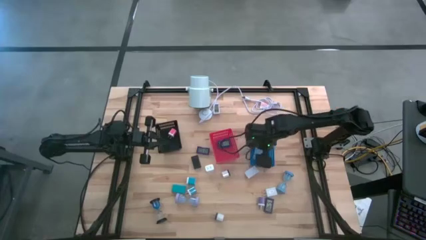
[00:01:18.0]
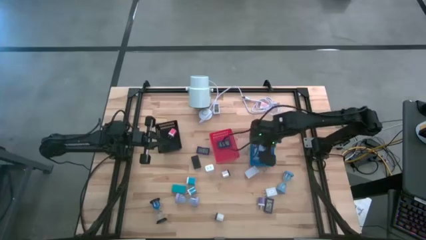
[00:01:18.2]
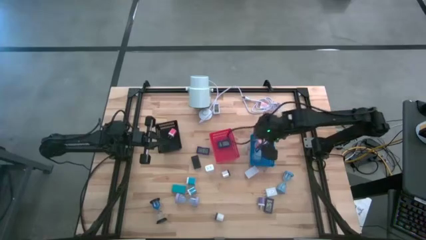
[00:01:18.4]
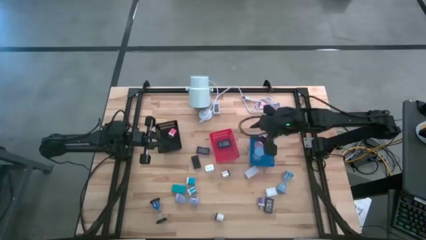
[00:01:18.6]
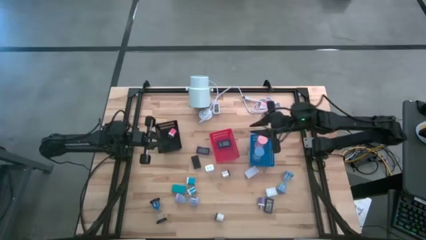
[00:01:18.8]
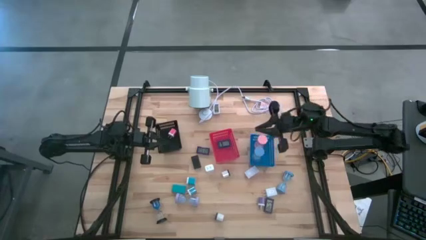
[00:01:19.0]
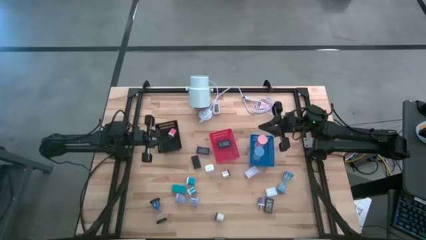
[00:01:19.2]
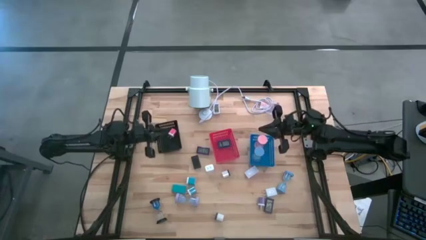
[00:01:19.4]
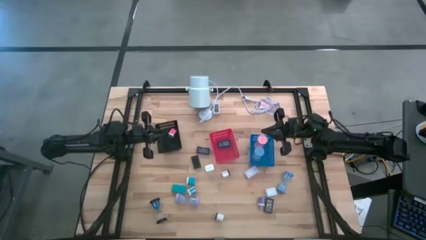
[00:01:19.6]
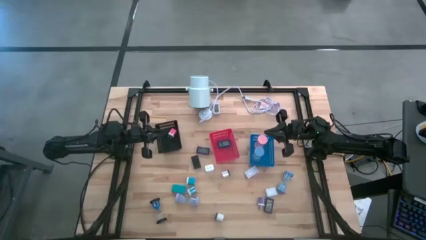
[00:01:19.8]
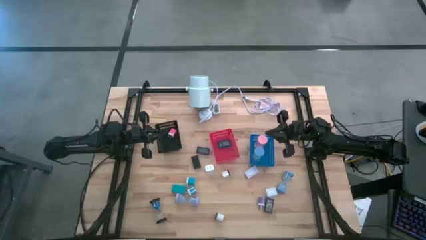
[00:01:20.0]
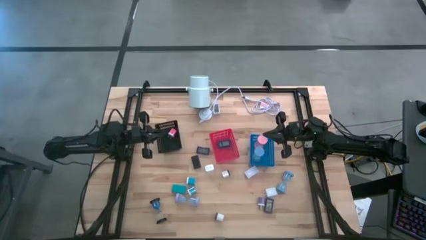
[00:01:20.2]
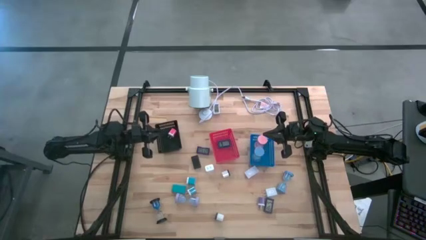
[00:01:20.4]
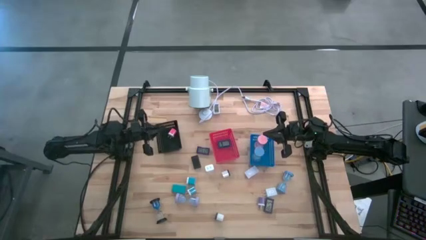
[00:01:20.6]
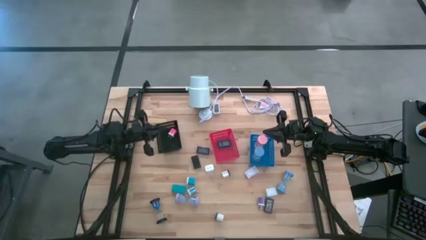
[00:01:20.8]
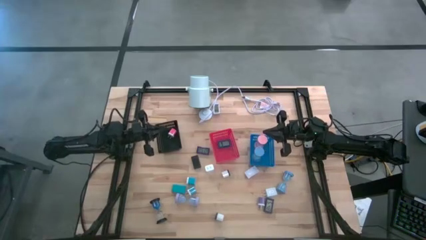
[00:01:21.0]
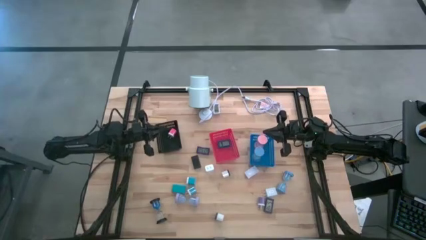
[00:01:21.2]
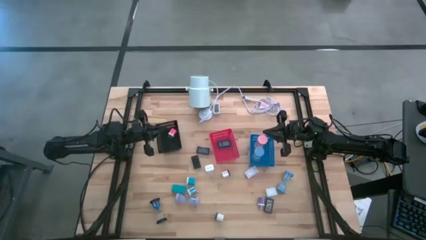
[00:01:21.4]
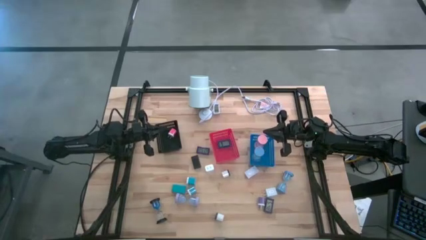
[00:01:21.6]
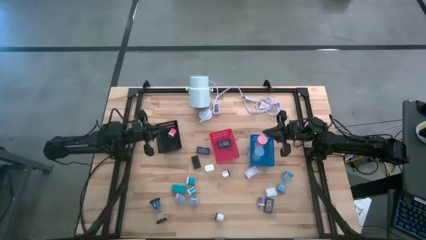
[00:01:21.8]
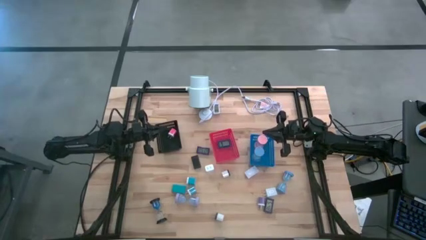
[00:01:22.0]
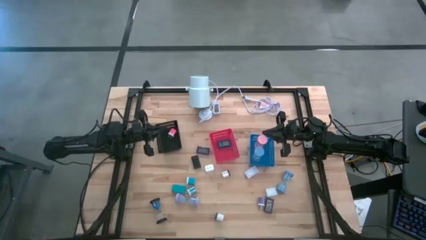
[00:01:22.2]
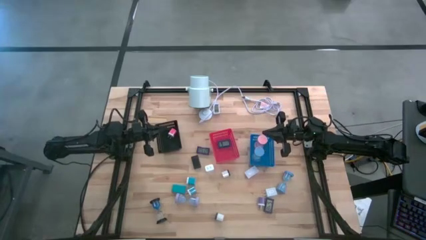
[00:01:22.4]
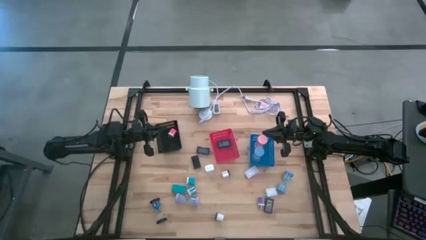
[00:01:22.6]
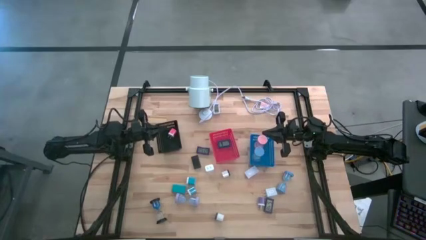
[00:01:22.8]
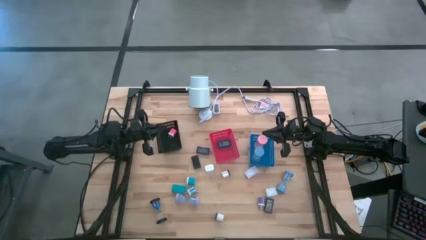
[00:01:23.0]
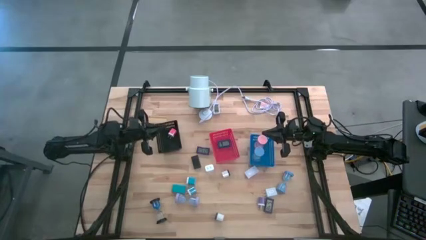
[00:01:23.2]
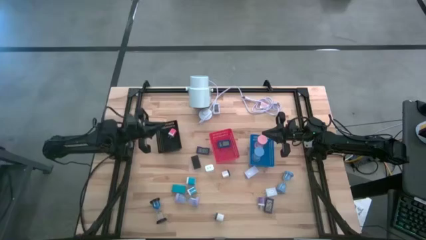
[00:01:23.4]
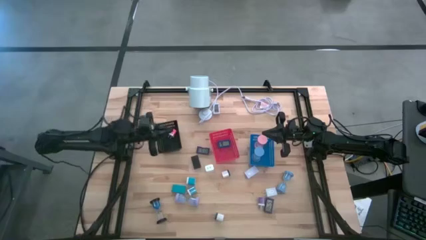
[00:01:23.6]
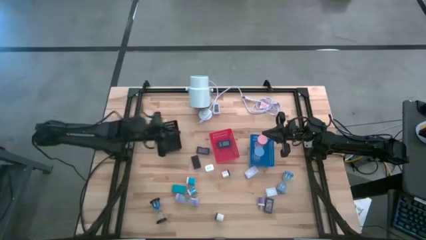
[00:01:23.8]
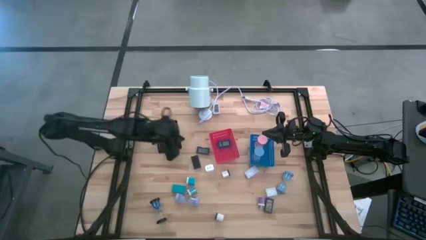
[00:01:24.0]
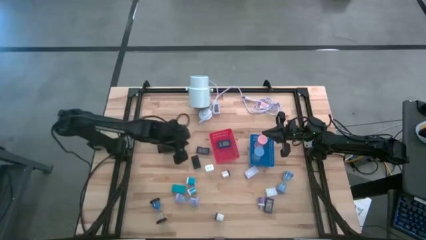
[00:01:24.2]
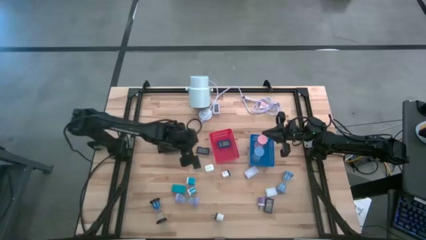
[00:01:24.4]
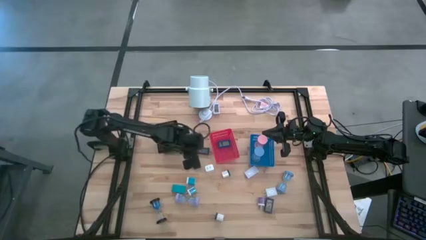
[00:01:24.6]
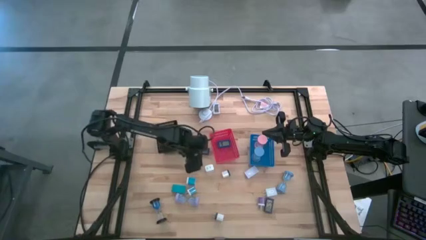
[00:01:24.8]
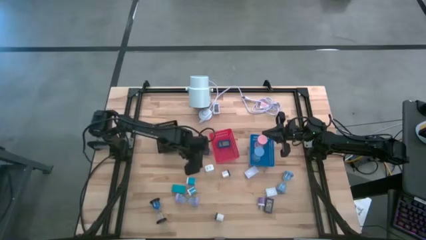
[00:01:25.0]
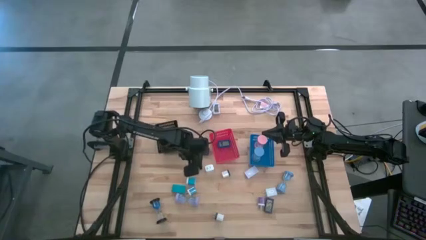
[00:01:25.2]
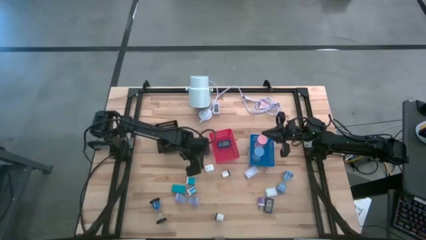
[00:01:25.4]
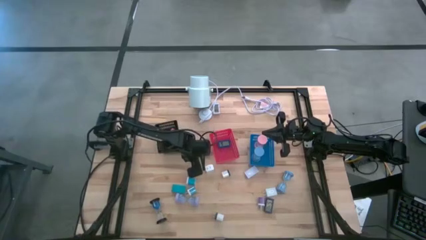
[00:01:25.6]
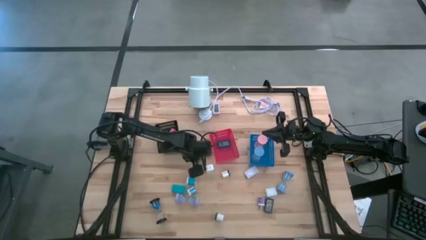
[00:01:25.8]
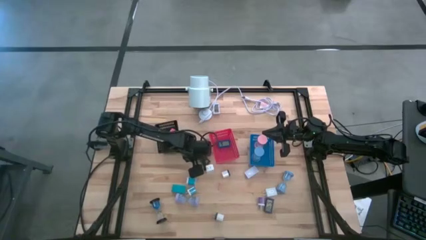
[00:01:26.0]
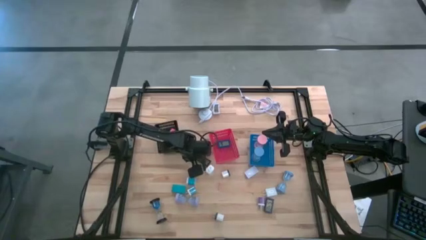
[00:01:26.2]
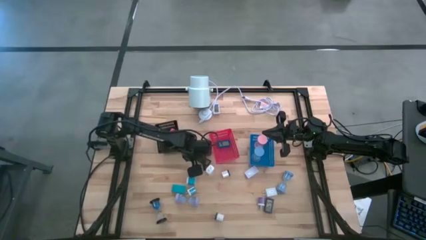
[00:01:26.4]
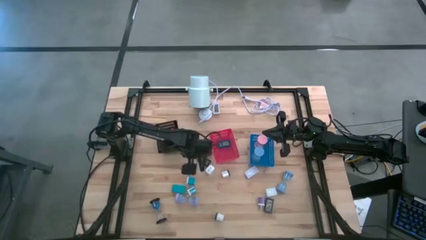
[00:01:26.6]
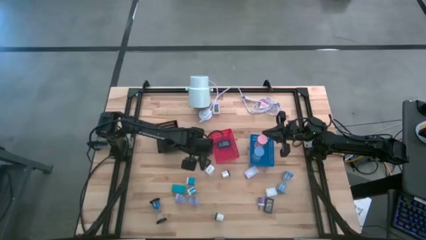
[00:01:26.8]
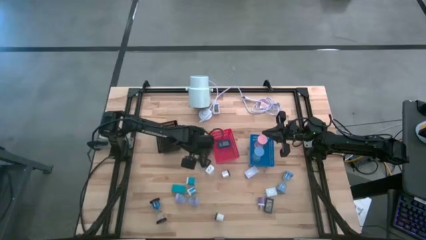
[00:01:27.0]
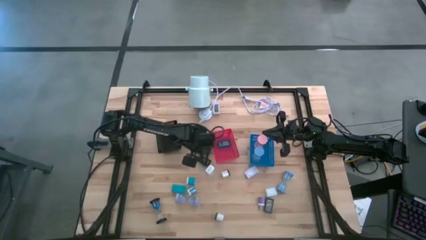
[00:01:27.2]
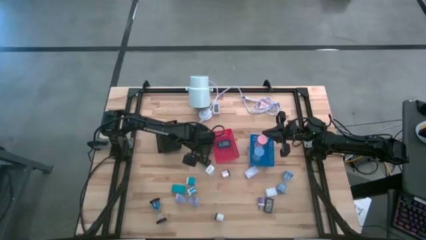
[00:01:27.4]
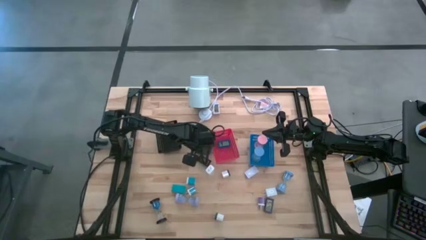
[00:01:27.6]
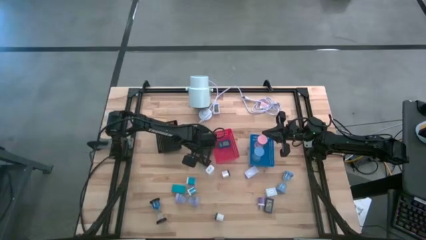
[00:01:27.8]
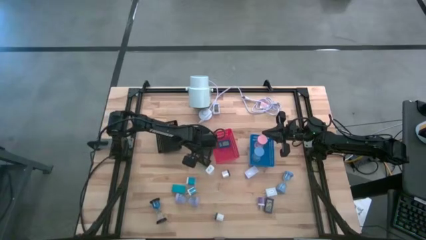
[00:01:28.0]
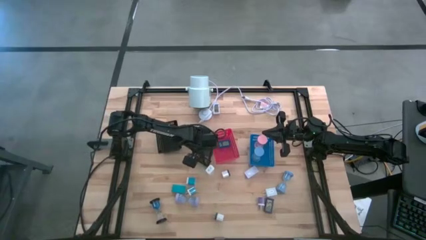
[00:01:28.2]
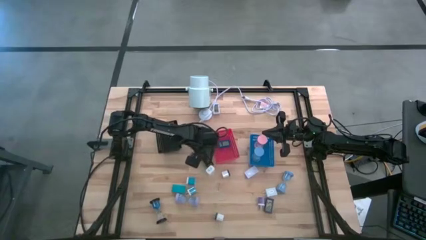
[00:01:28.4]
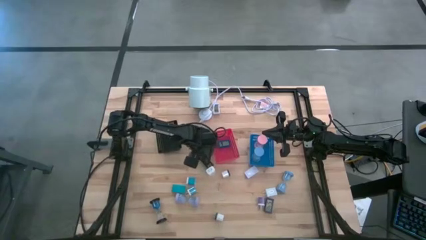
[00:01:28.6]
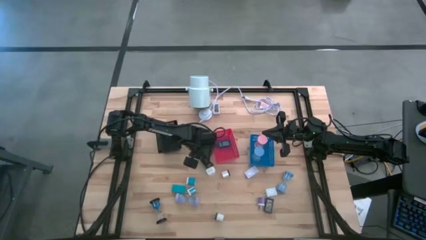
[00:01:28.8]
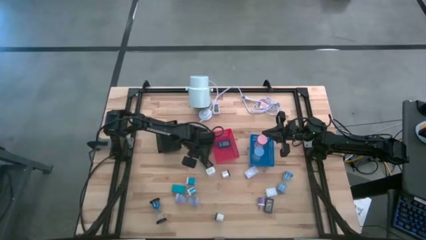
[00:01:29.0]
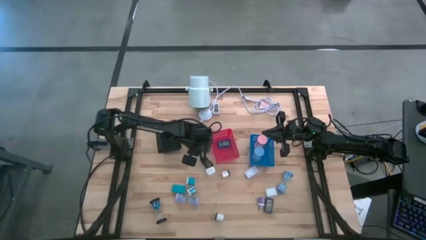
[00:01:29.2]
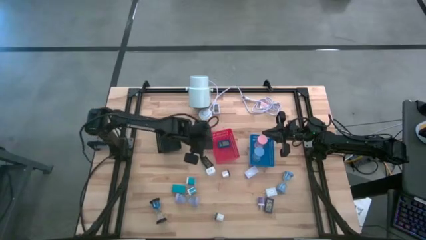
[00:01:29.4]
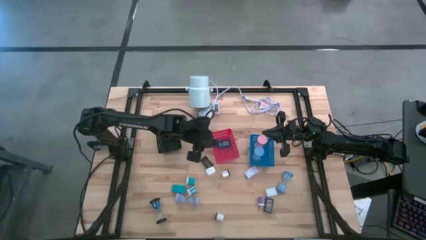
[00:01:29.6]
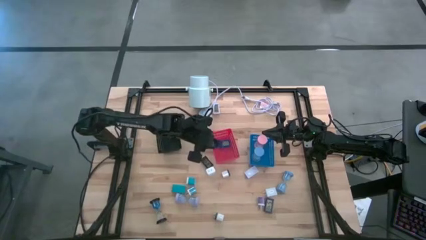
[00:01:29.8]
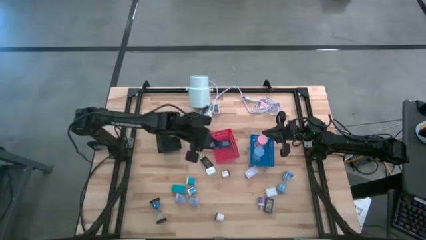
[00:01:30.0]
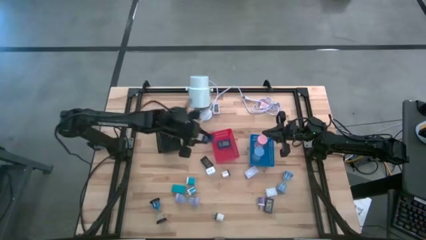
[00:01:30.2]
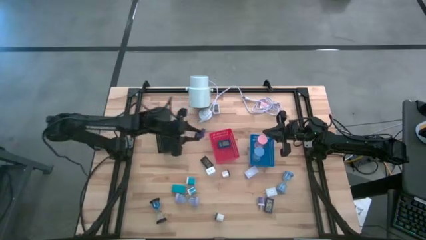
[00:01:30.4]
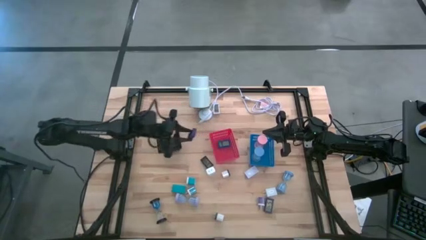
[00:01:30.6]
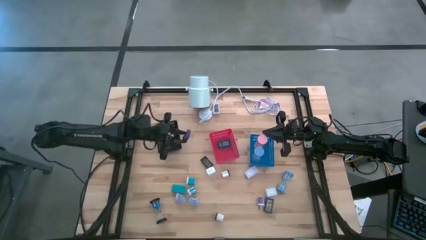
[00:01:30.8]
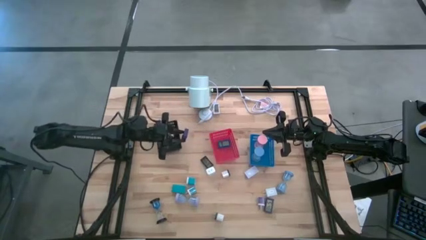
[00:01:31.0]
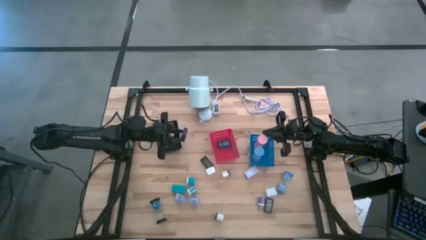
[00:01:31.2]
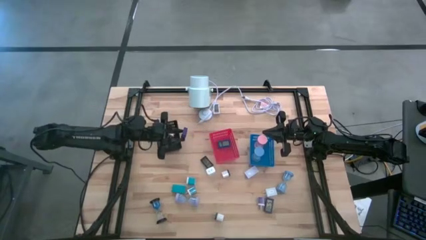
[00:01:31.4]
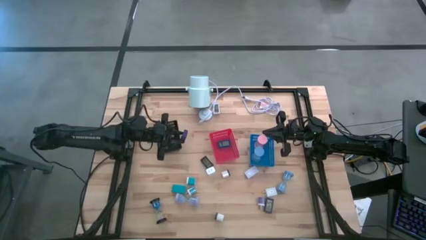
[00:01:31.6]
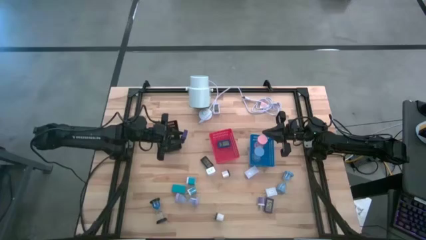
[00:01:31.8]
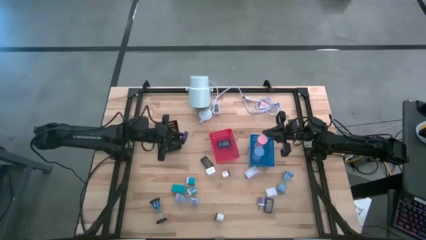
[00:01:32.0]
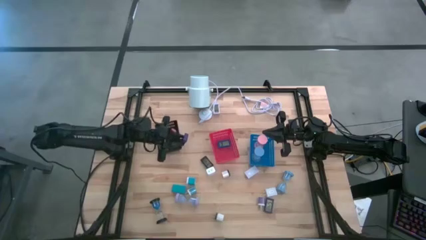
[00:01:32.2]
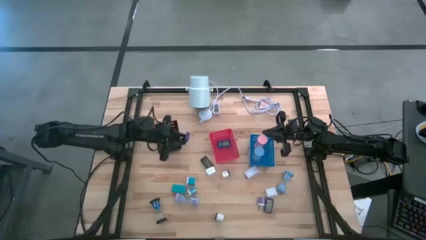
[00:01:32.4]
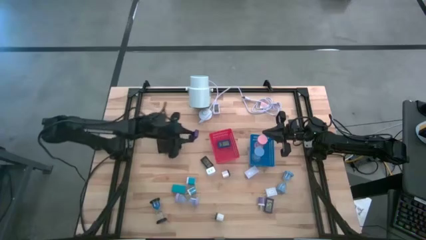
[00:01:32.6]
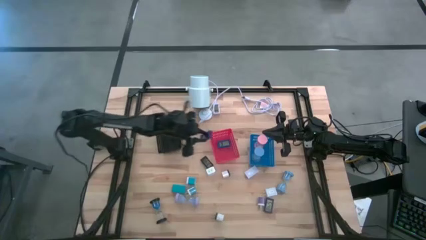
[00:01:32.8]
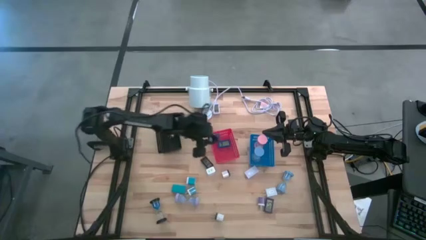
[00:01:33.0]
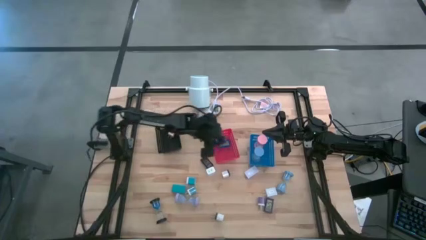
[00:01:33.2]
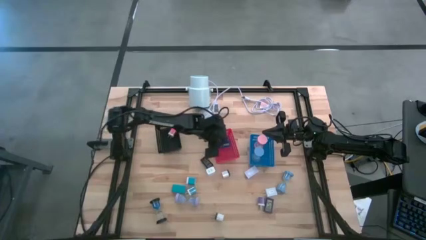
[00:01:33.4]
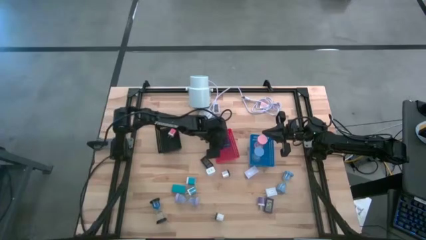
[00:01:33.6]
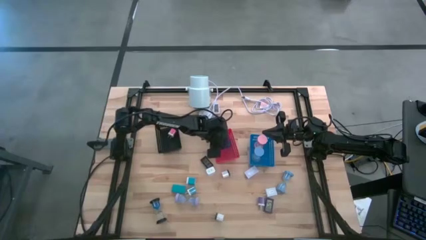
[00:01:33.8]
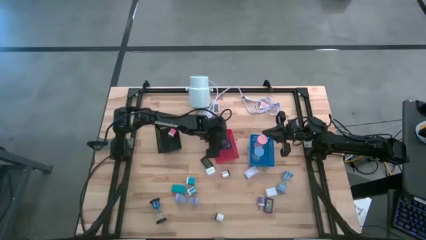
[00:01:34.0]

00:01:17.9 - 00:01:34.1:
Task: Pick & Place Office items
Put the top blue digital clock into the red bin

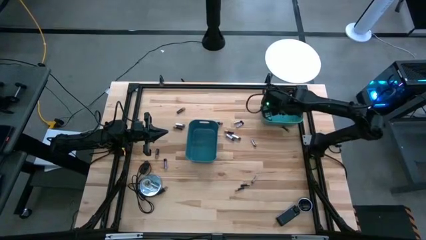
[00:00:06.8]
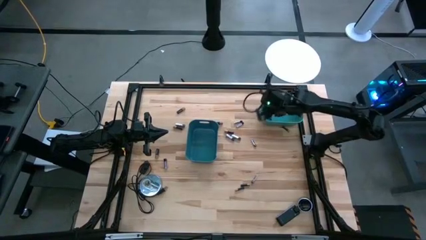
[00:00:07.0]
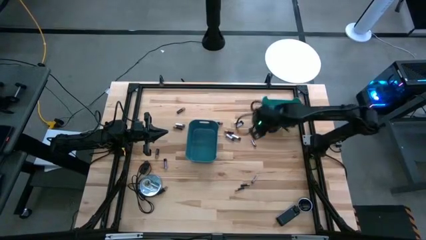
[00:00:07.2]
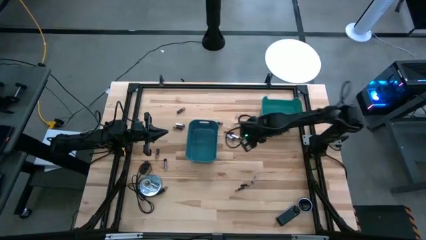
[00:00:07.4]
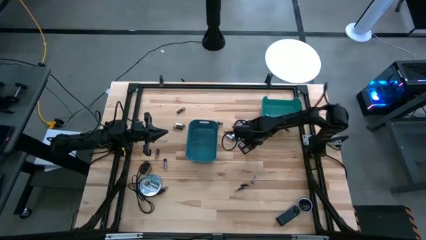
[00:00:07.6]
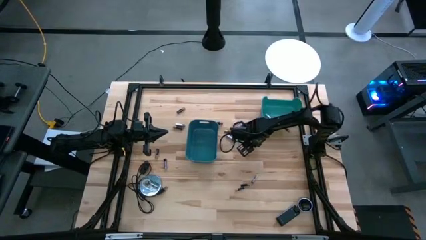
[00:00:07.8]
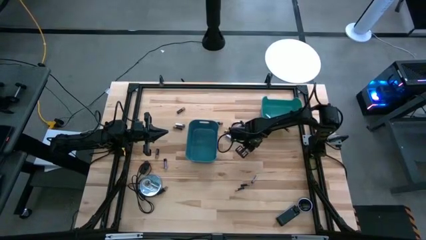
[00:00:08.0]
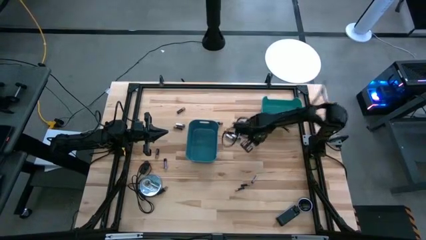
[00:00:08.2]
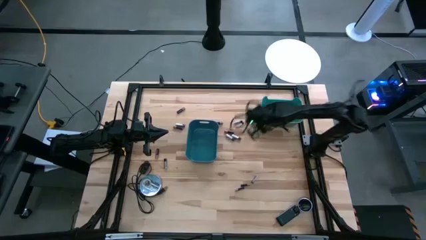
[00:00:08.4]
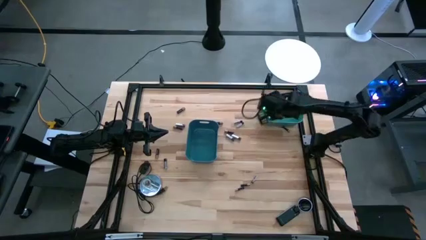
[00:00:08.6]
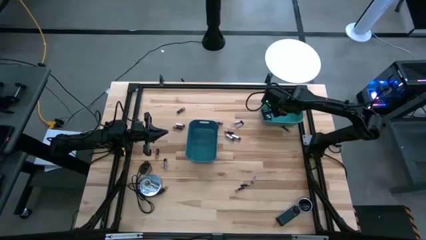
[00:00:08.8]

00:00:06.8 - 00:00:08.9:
Task: Sort batteries
Put the silver battery into the green bin
